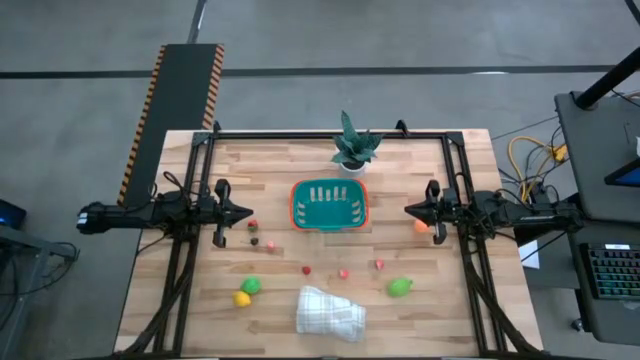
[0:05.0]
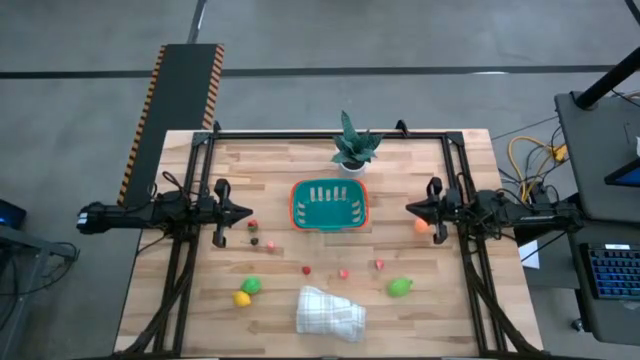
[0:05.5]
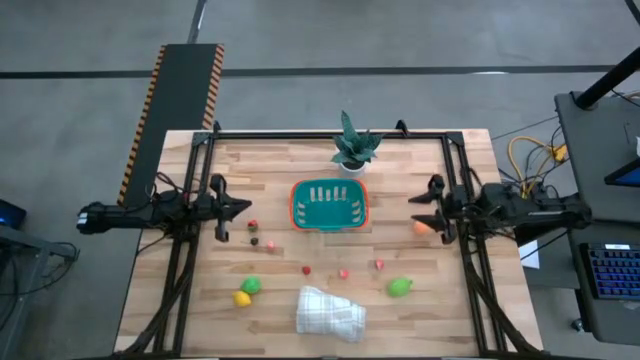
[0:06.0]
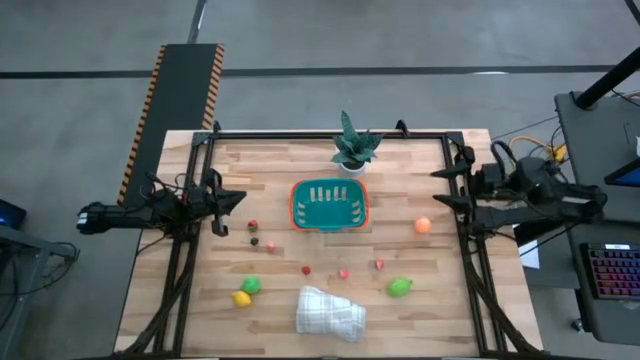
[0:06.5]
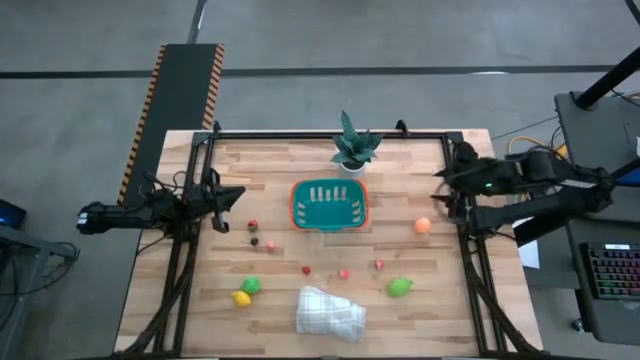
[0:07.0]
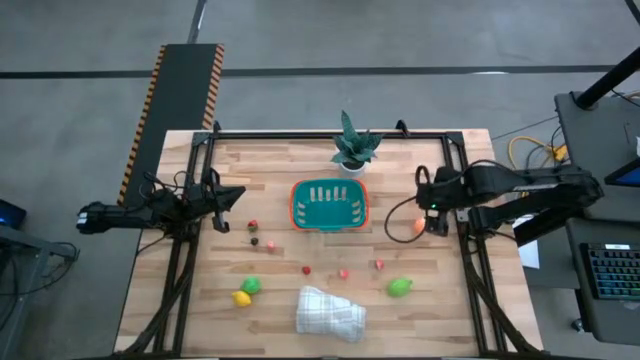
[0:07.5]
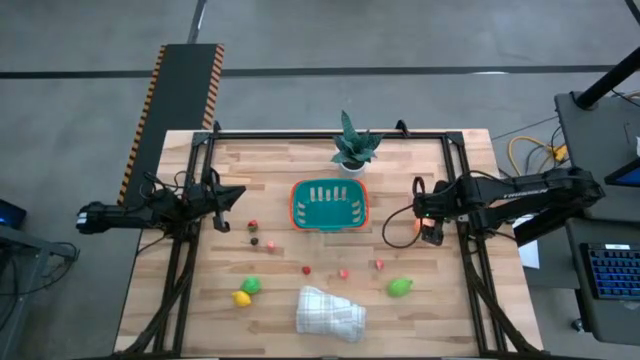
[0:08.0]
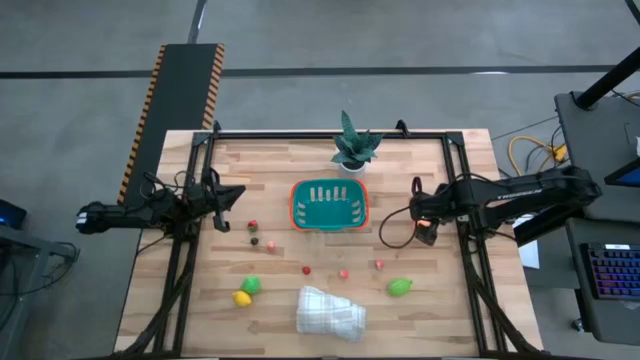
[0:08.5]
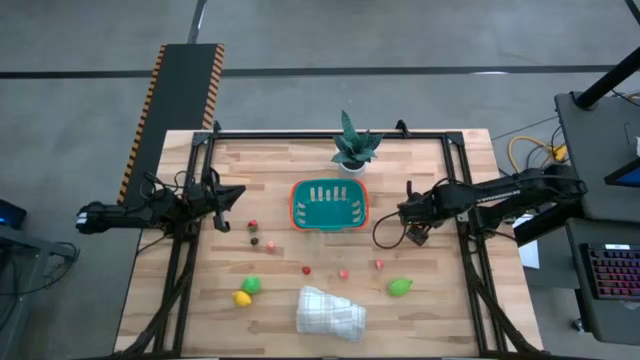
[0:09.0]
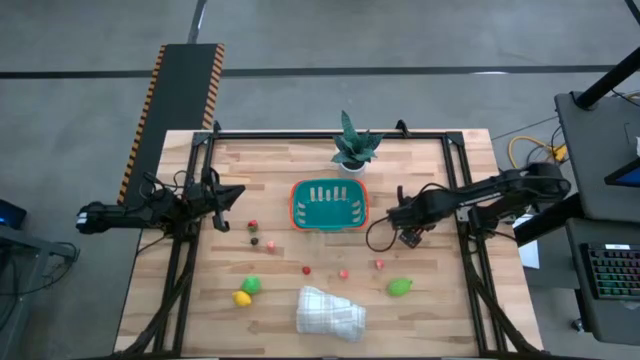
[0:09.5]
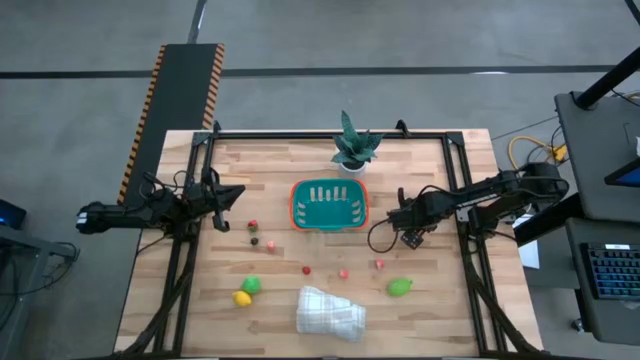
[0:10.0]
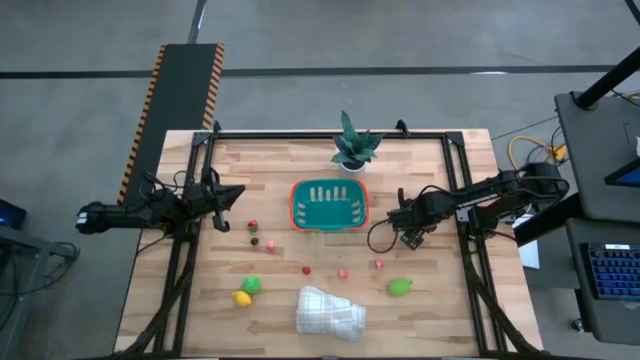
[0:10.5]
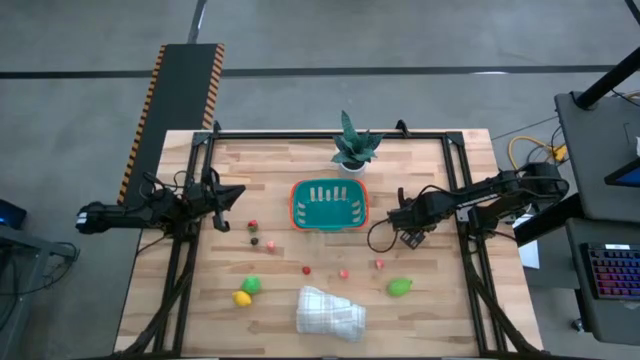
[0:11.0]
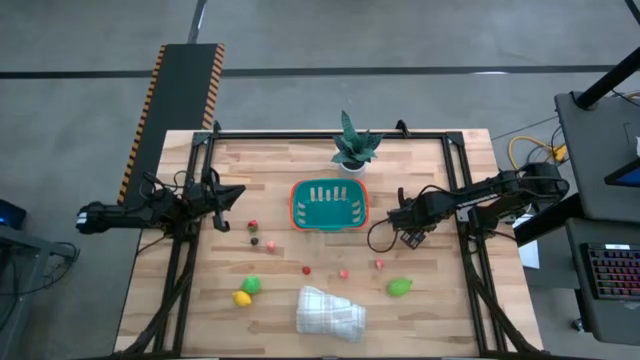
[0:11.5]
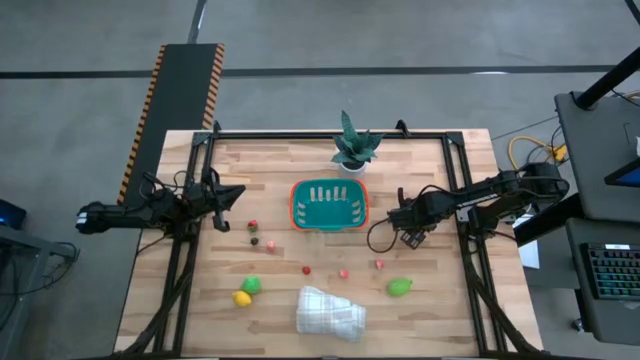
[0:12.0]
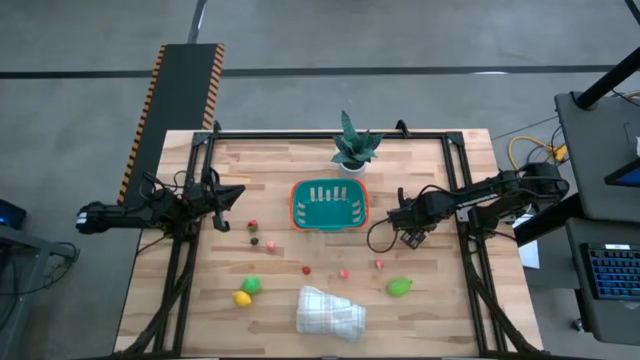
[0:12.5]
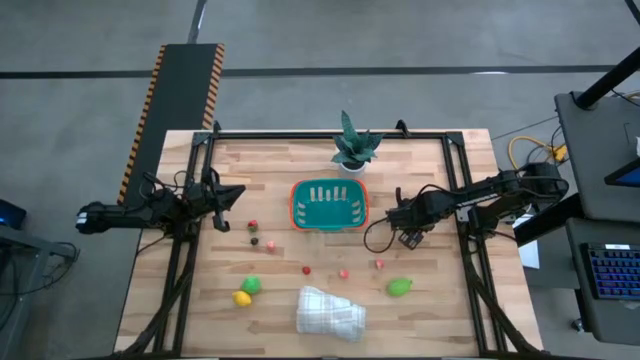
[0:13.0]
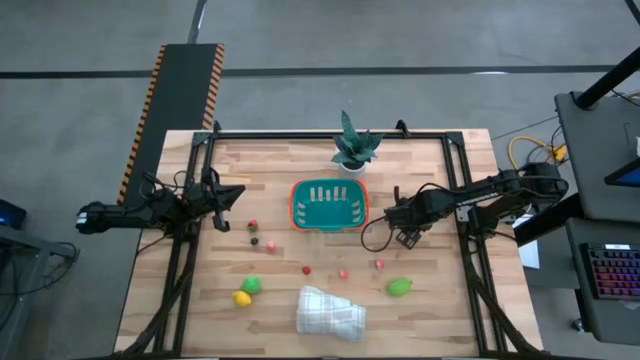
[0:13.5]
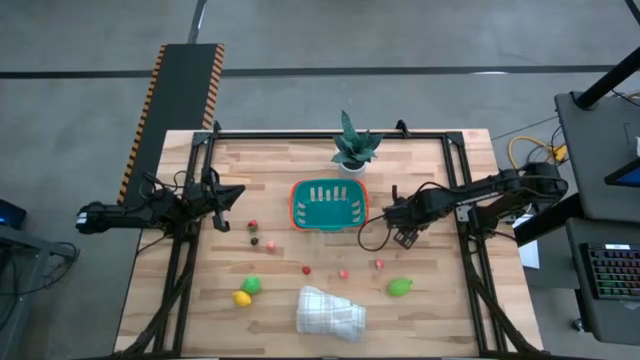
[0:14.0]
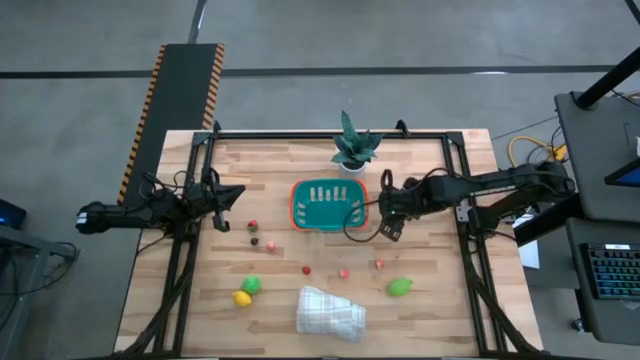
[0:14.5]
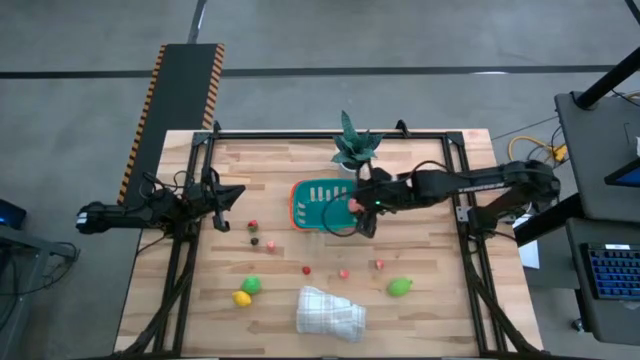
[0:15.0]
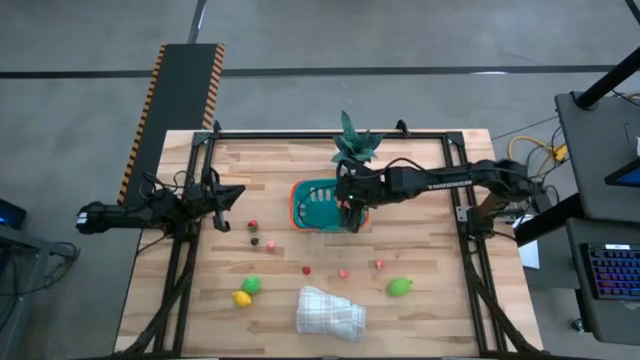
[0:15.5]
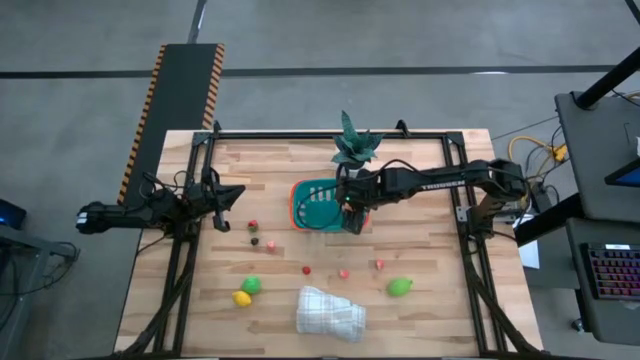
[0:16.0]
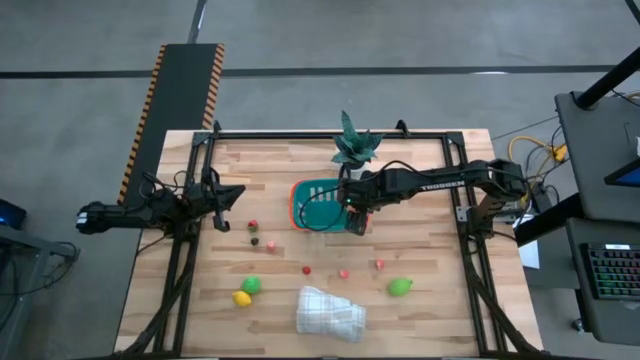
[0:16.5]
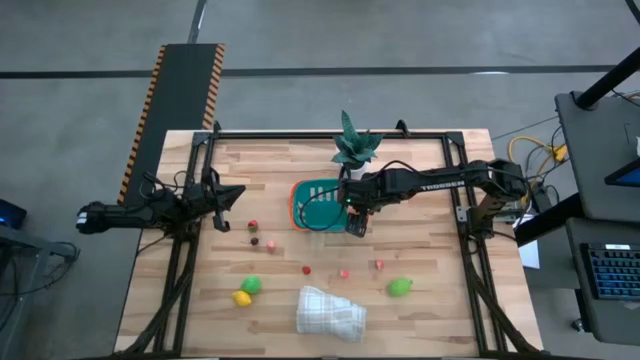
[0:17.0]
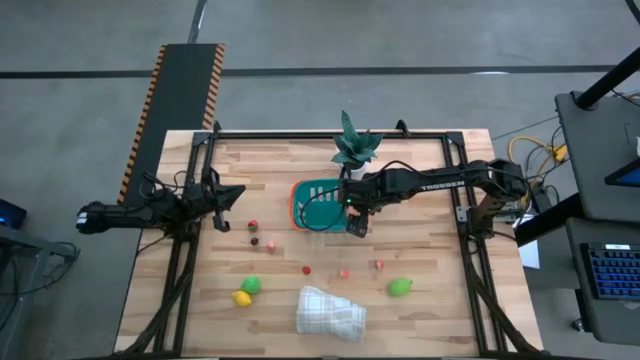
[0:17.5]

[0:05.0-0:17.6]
Task: Build produce basket
Put the pink peach into the blue basket

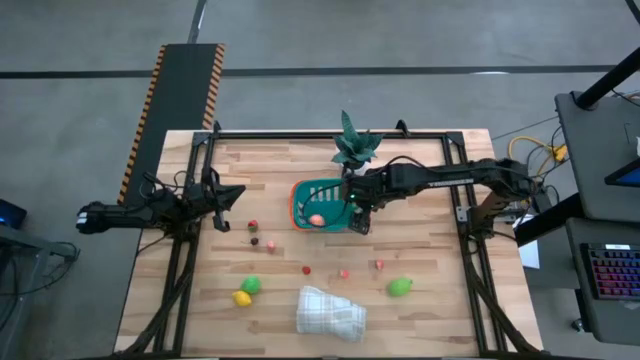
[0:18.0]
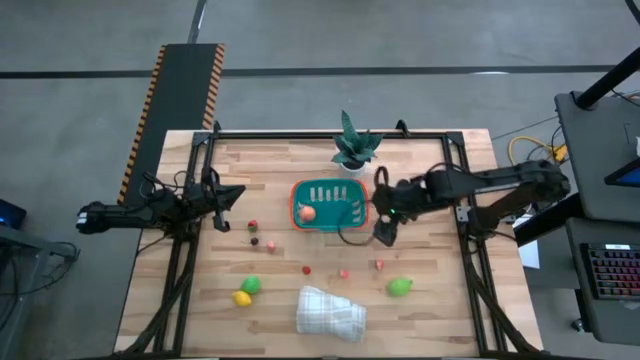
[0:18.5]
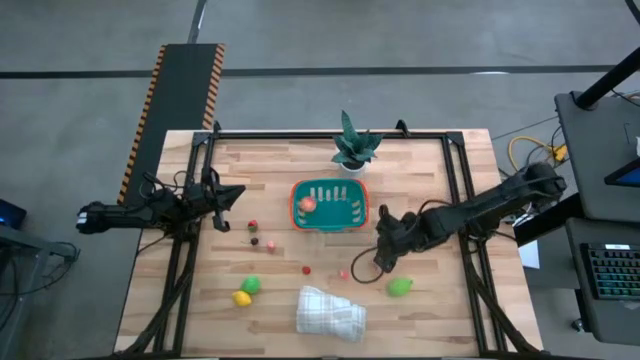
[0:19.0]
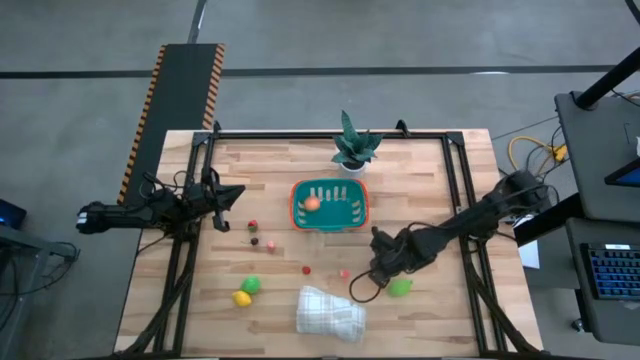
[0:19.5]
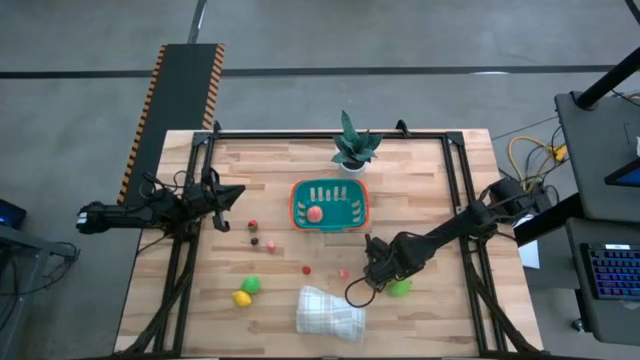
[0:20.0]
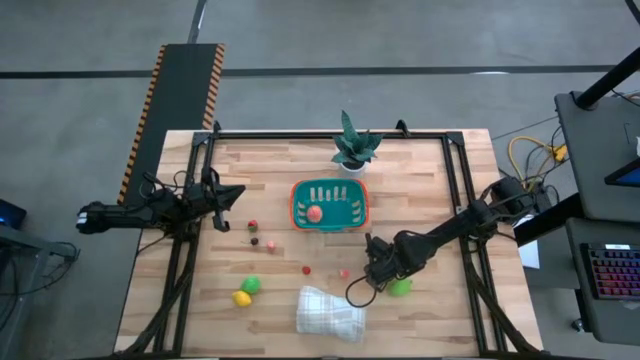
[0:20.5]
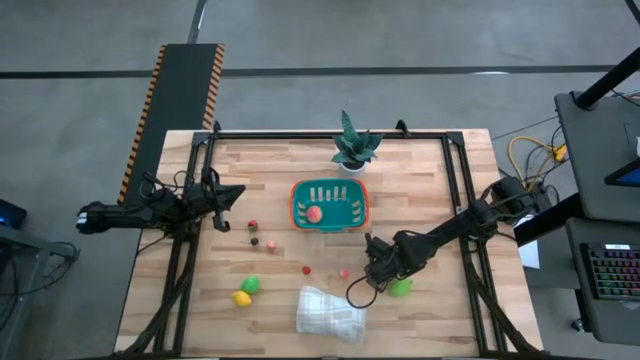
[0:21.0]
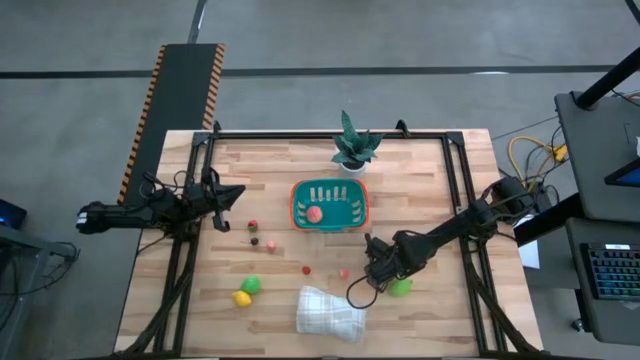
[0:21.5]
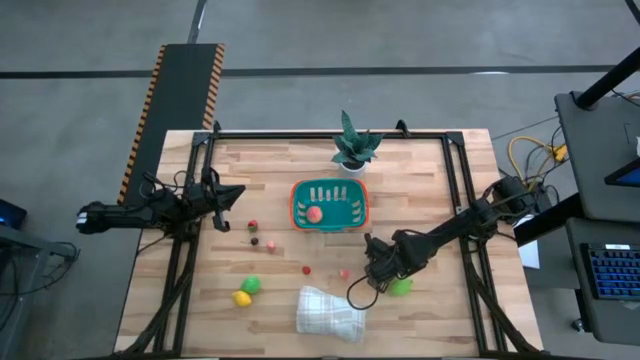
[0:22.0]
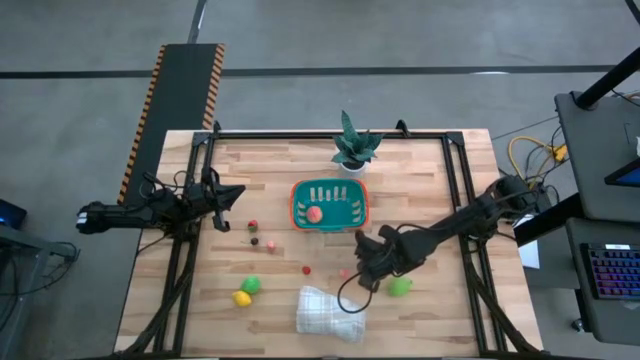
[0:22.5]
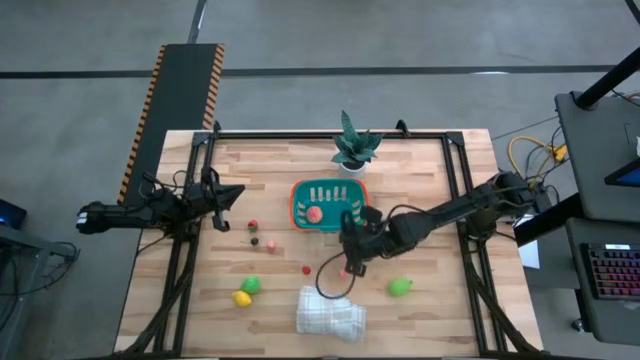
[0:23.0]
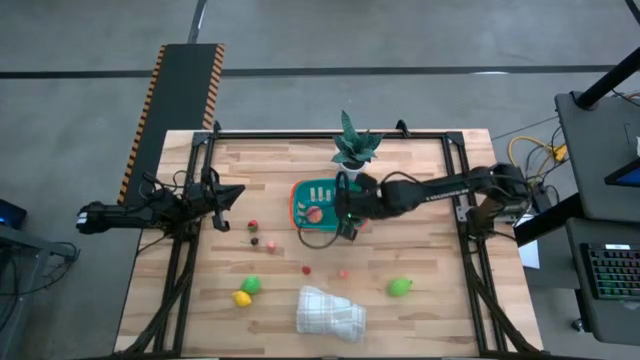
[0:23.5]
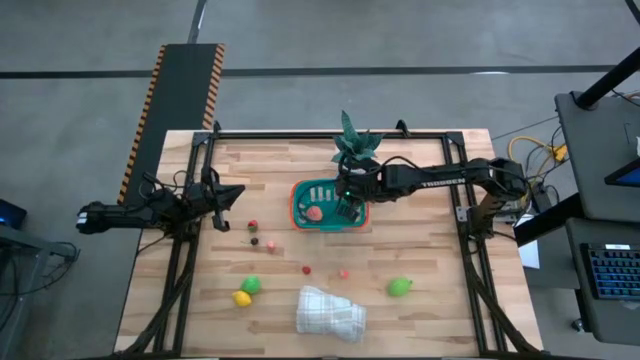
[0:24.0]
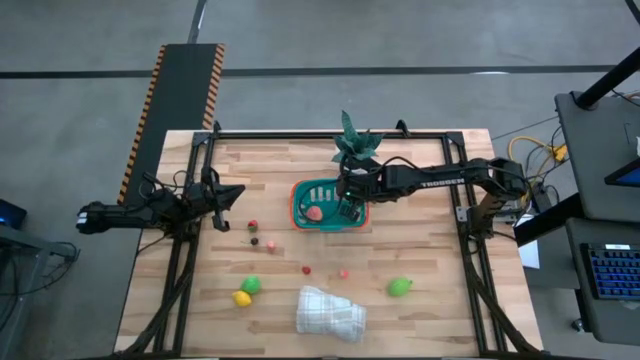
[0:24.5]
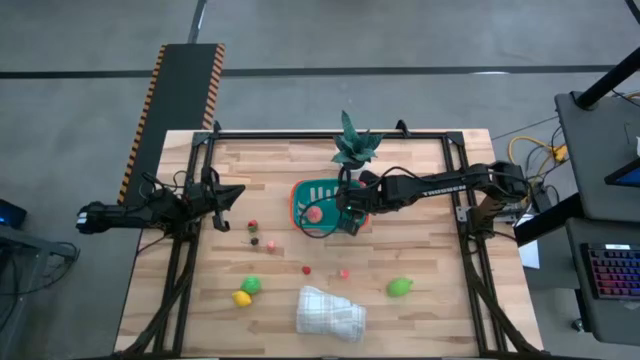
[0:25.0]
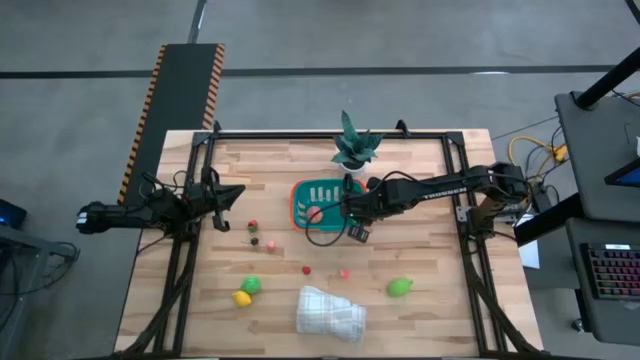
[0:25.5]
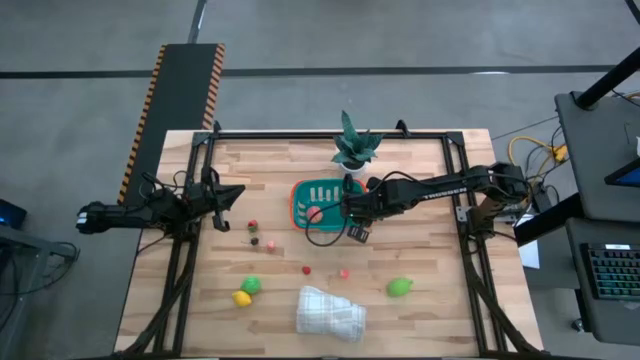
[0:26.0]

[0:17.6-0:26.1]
Put the pink peach into the blue basket
